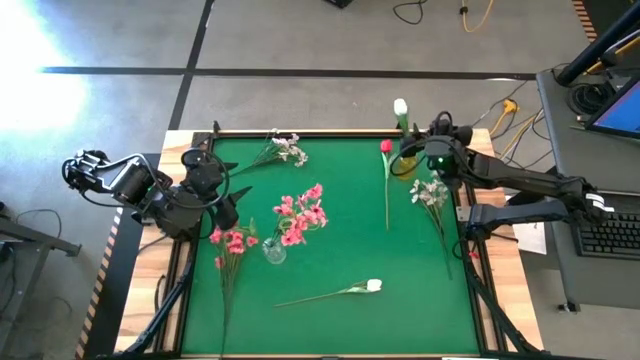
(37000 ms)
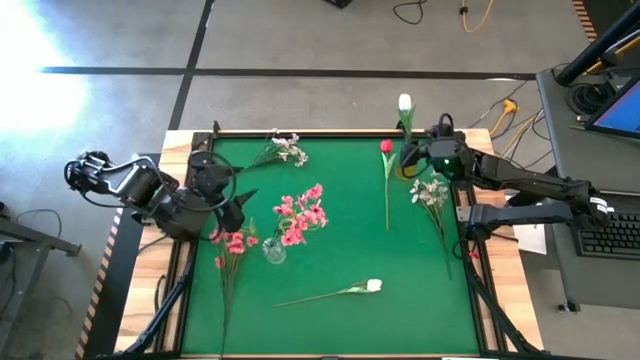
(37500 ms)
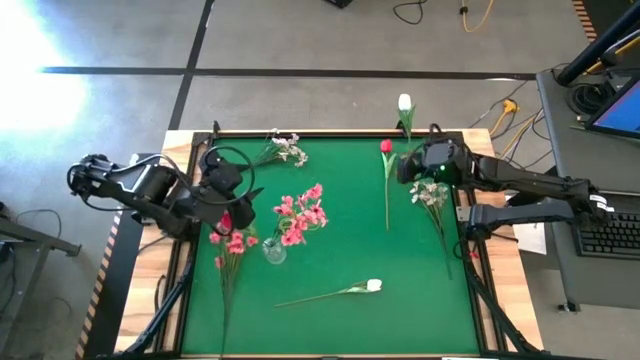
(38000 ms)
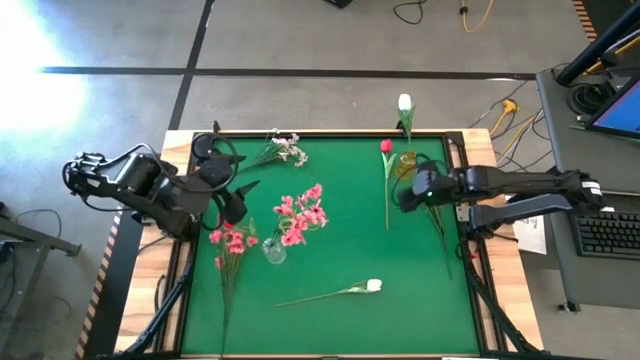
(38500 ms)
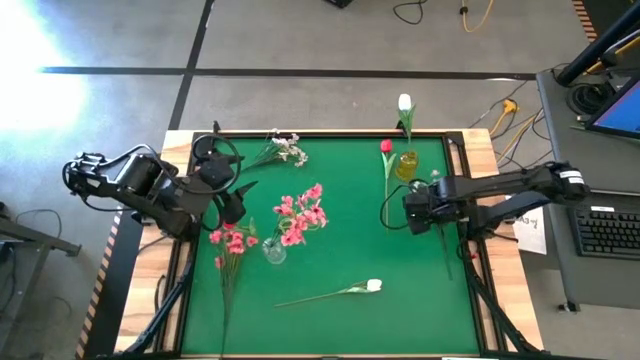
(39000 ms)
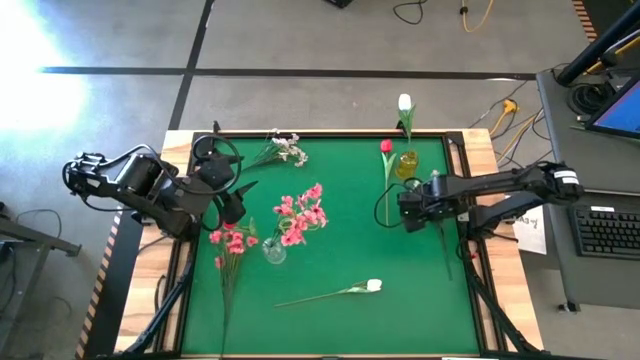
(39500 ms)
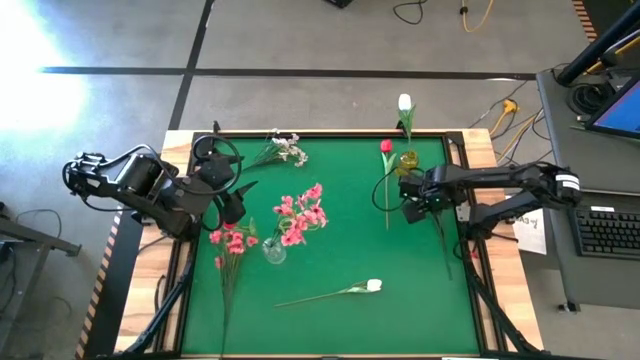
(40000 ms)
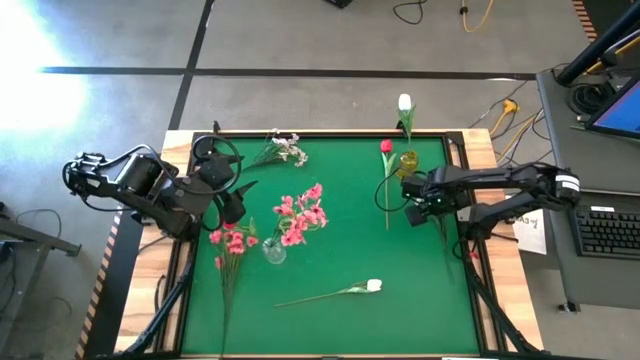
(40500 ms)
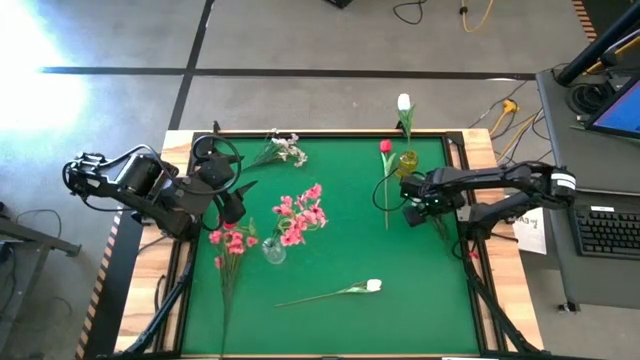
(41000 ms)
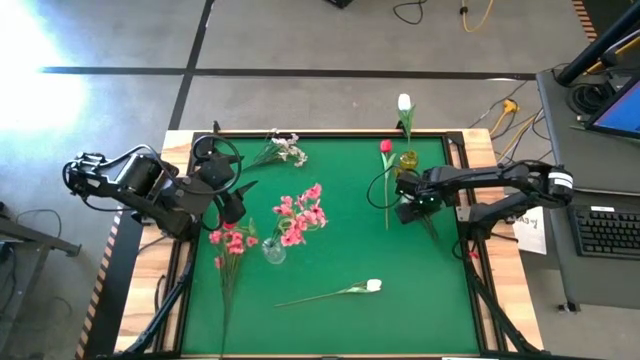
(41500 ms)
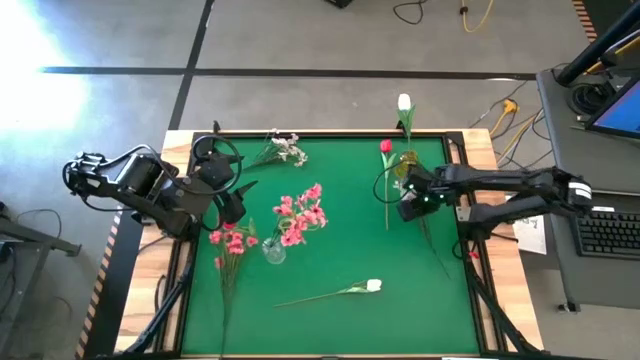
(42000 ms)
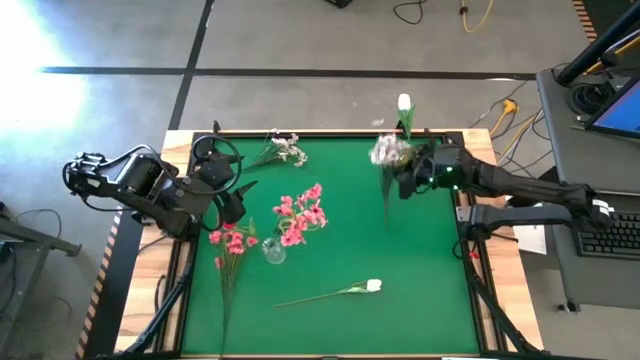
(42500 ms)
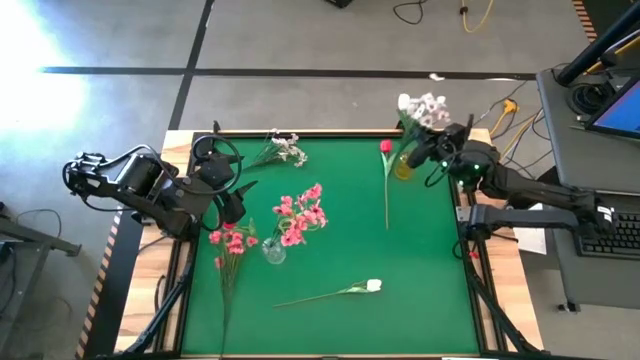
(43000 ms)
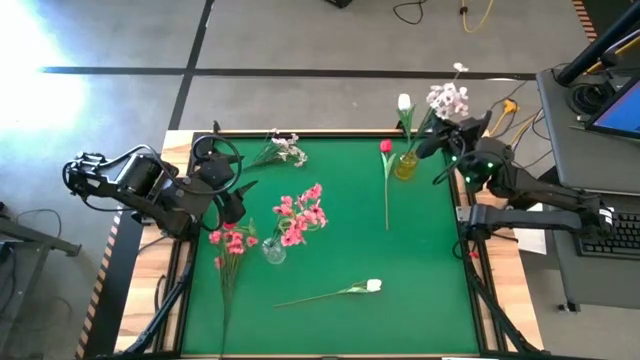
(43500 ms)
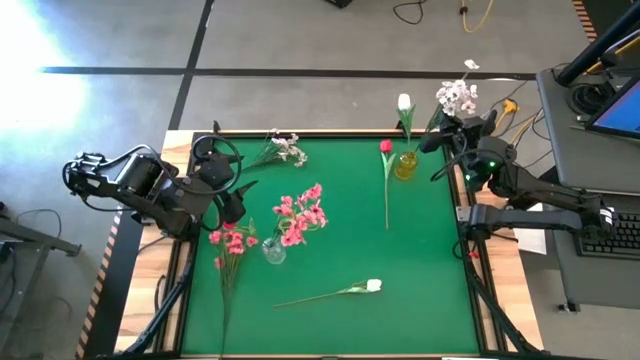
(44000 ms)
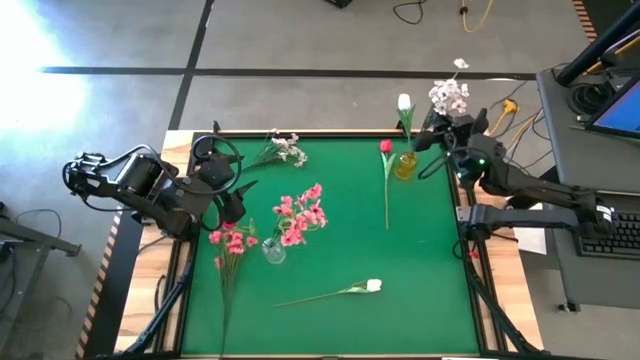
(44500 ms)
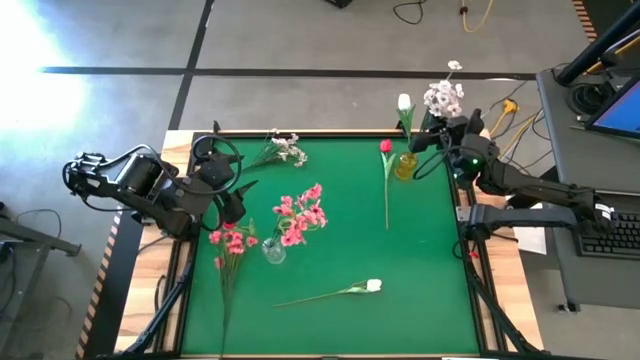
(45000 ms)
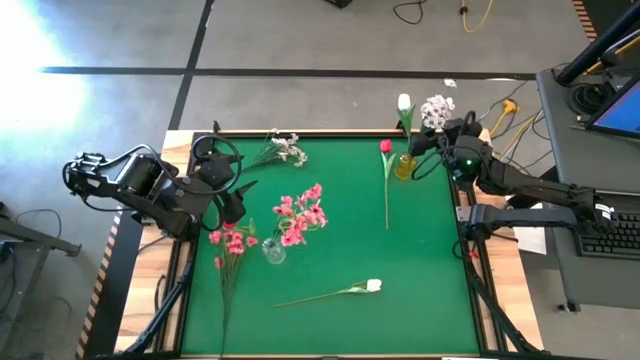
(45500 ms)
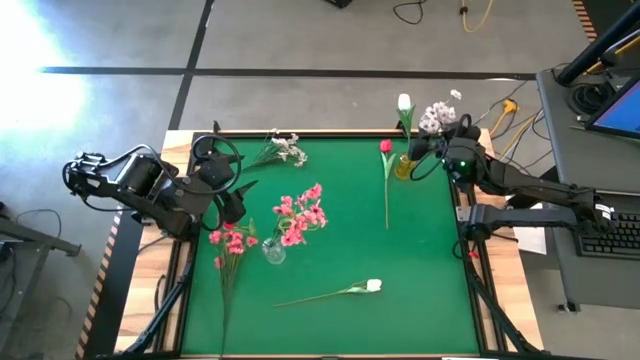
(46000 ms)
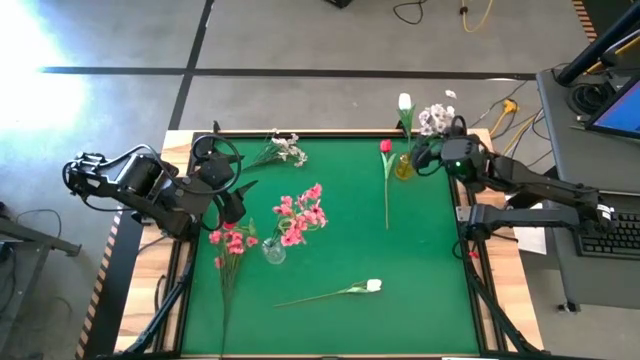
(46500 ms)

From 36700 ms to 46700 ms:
Task: Sort flowers into vase by color
Put the right white flowers into the yellow vase

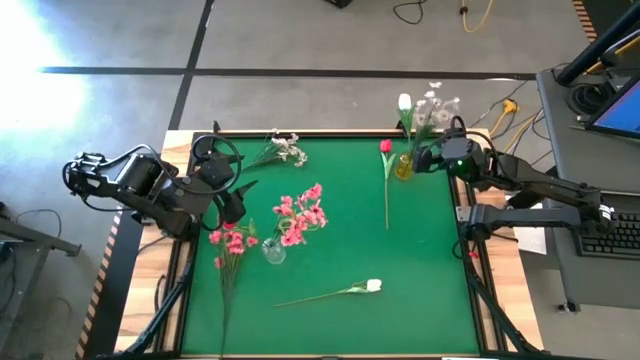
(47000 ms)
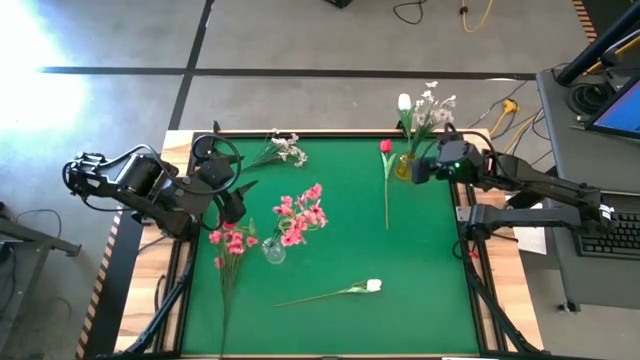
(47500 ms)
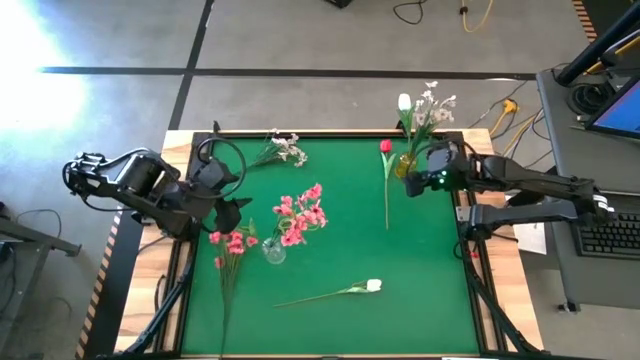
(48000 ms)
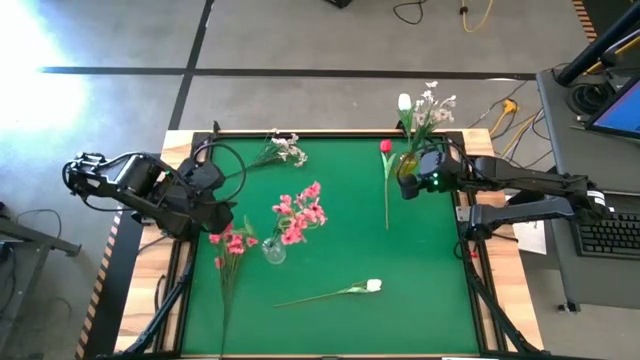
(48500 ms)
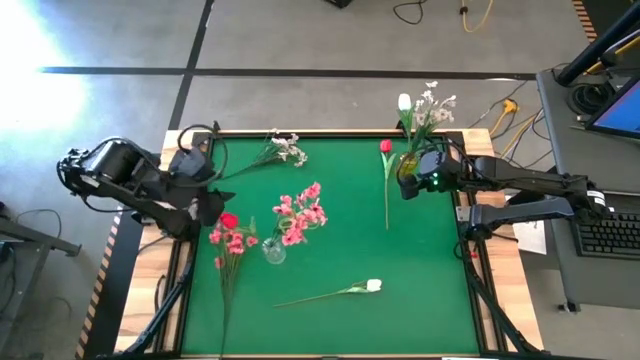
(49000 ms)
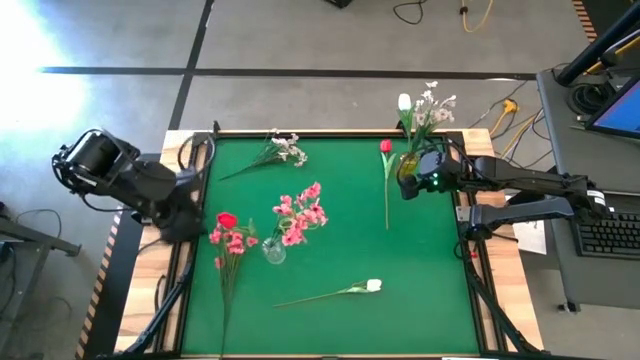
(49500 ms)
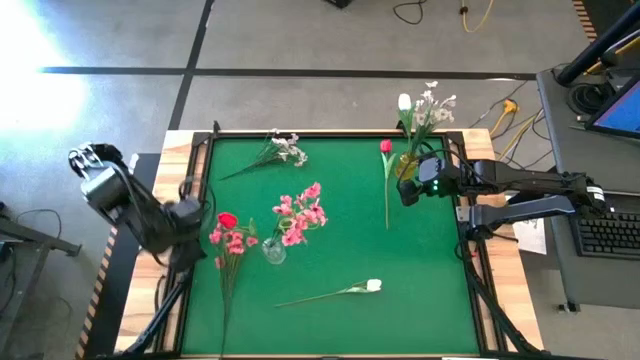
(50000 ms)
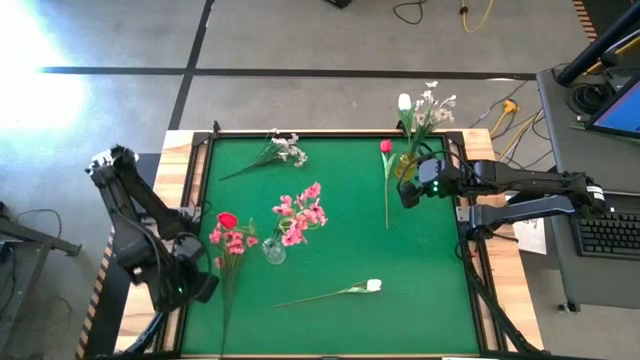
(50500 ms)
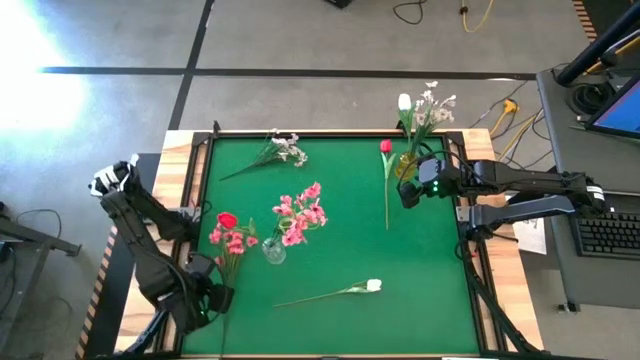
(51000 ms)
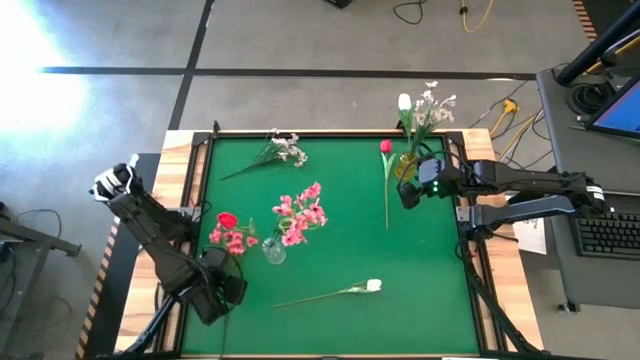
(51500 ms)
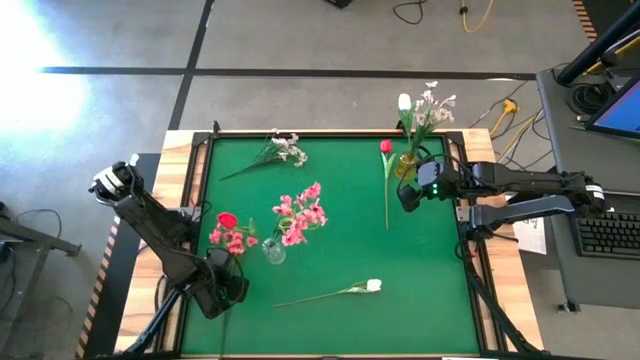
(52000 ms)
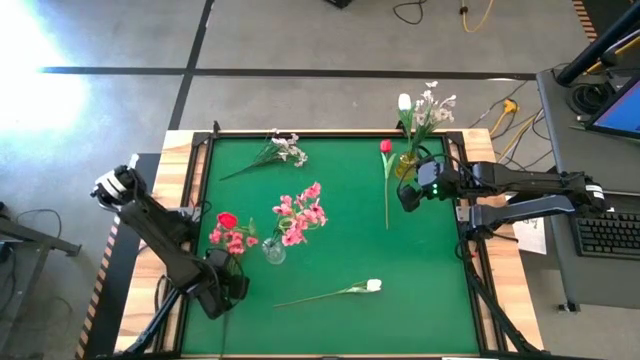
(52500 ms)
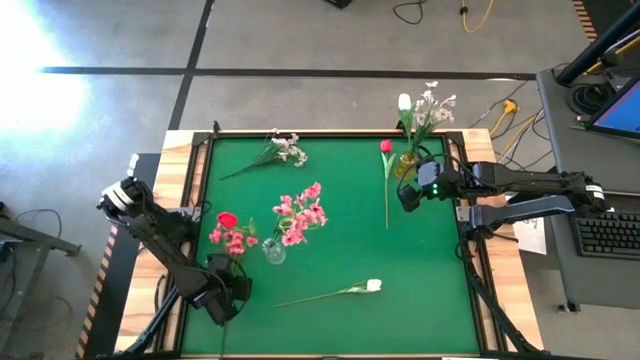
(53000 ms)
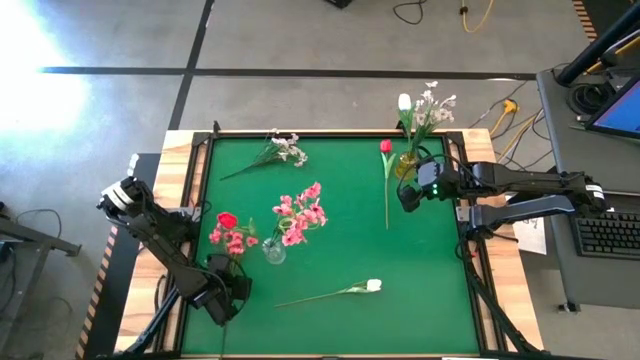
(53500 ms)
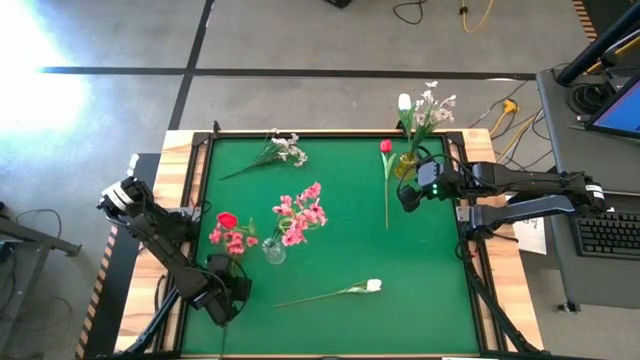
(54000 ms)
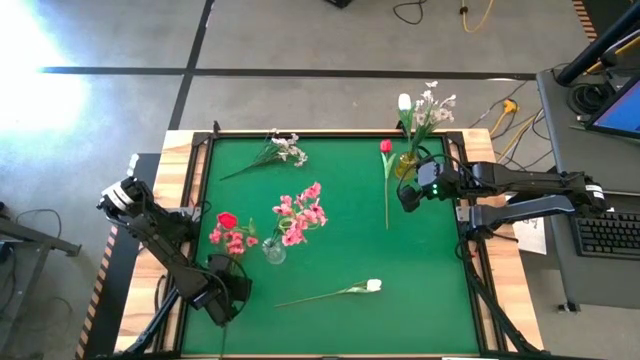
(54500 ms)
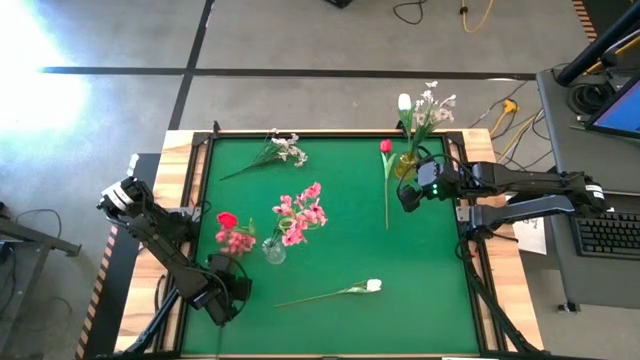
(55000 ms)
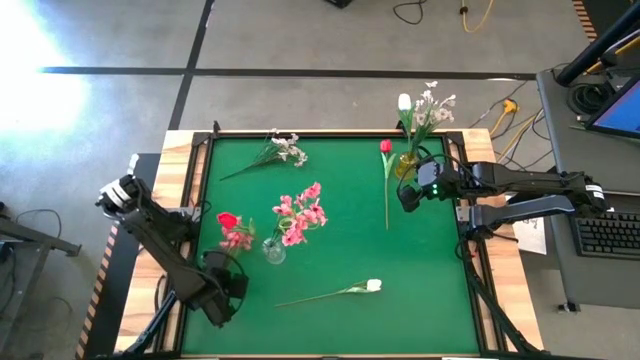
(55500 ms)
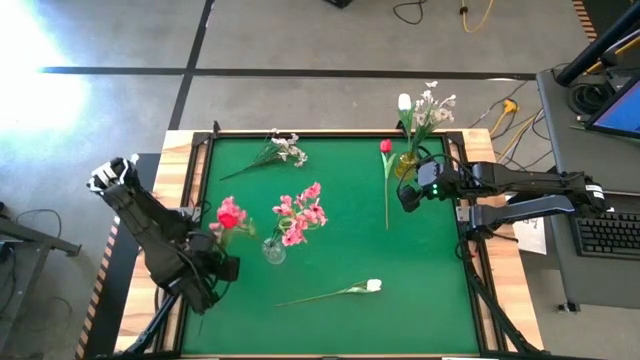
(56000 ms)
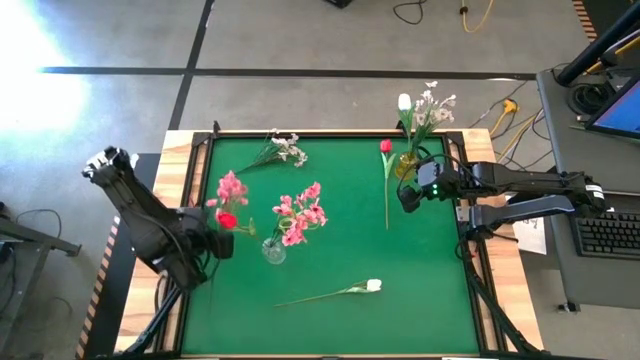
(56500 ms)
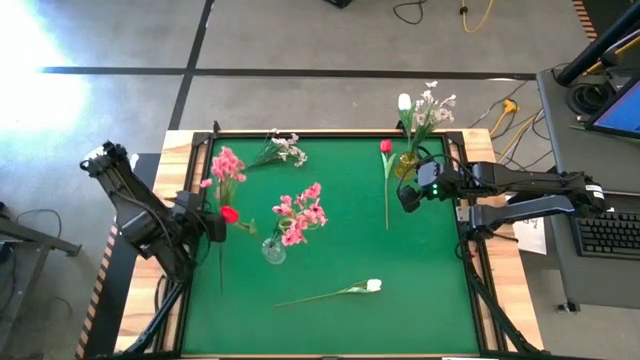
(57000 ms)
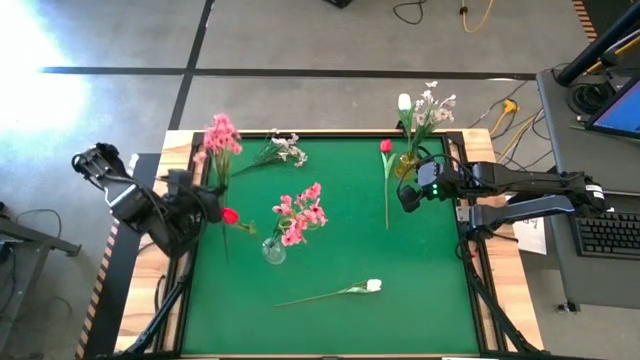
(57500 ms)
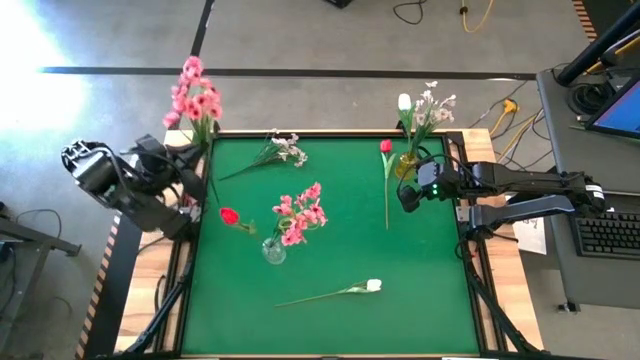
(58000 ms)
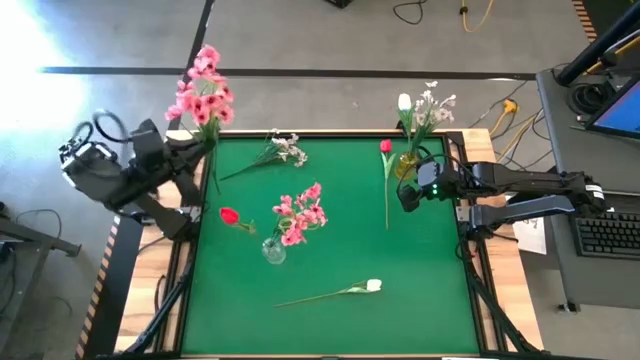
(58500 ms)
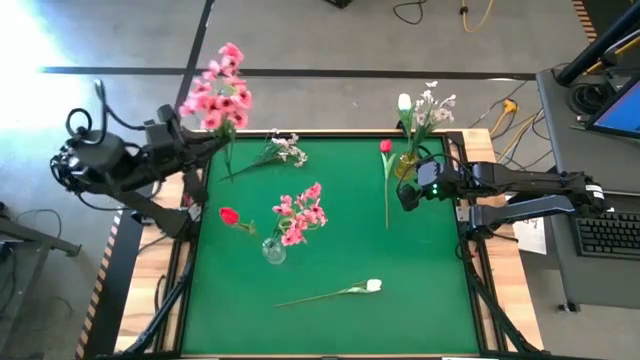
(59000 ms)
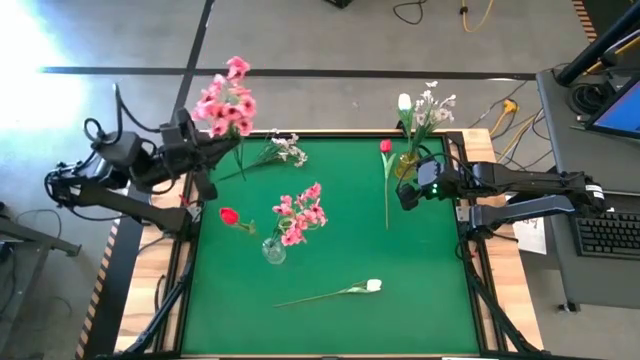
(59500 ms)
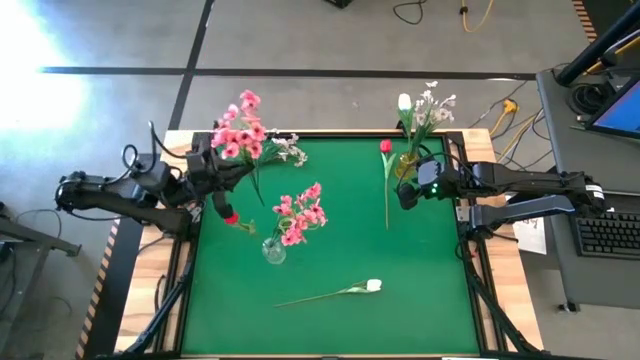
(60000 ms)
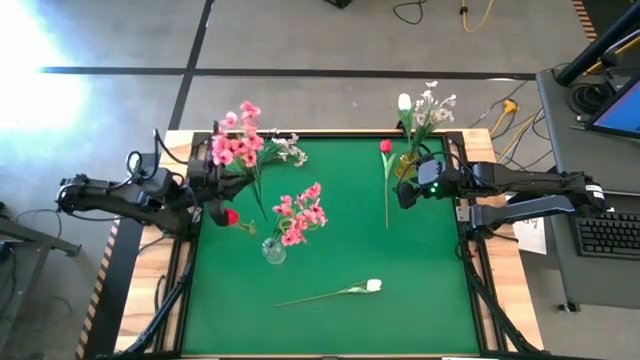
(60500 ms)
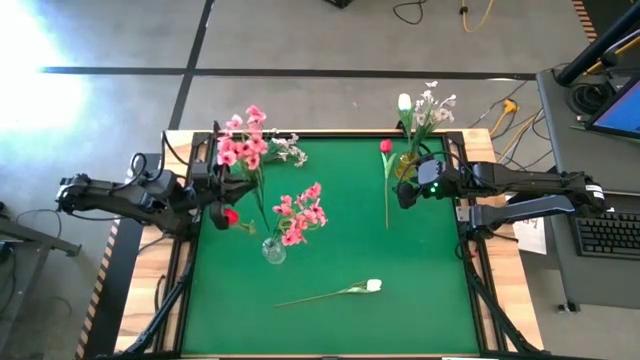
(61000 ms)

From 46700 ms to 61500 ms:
Put the pink flowers into the transparent vase
